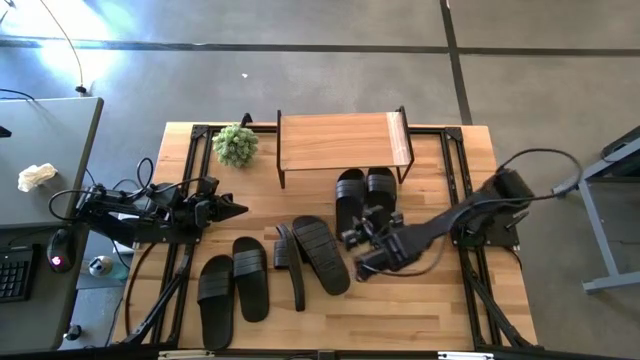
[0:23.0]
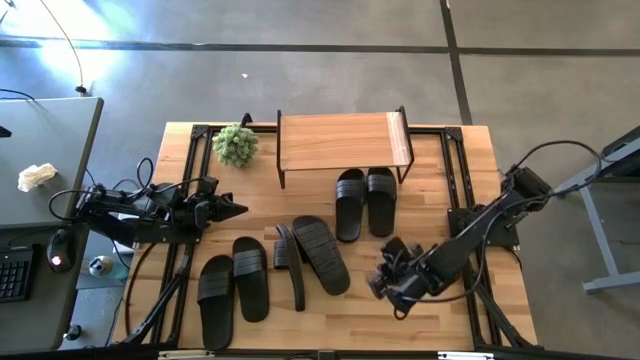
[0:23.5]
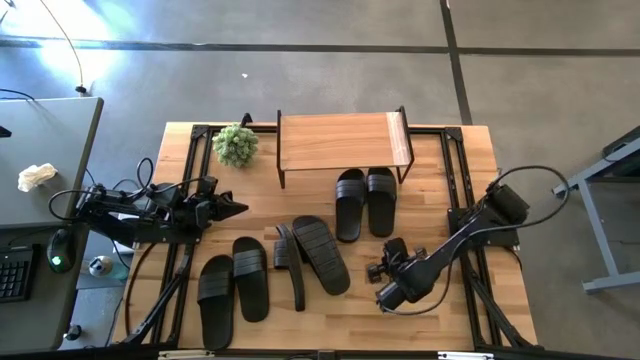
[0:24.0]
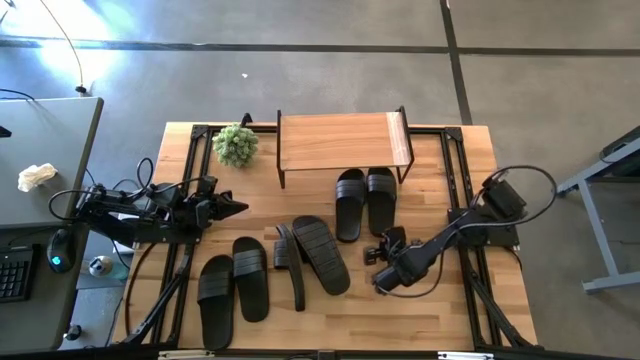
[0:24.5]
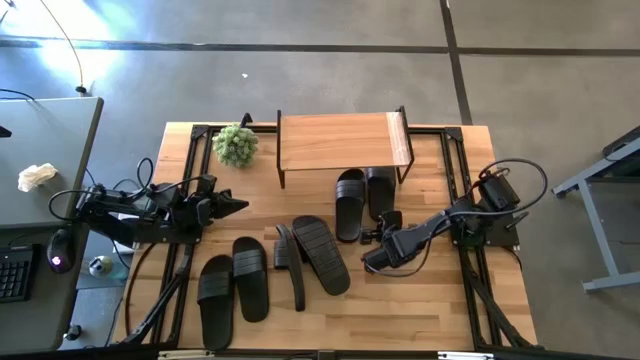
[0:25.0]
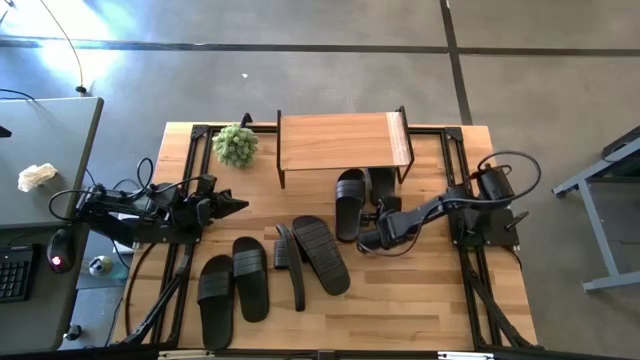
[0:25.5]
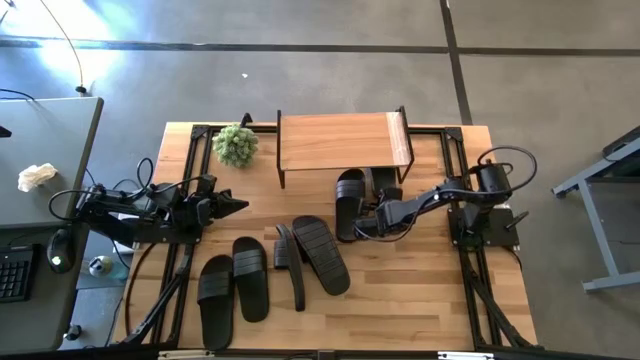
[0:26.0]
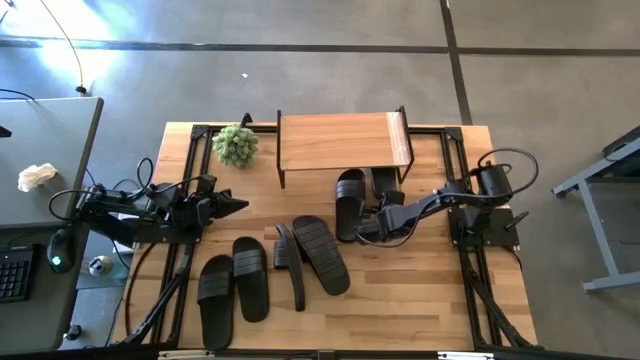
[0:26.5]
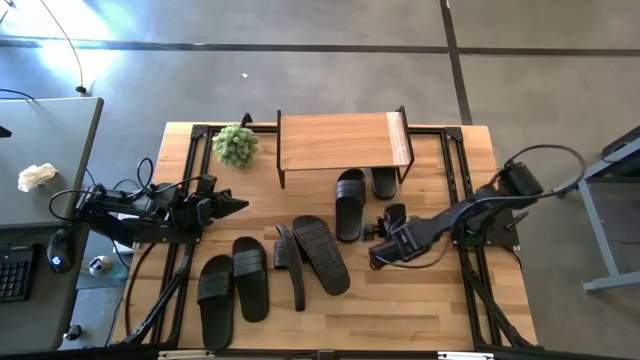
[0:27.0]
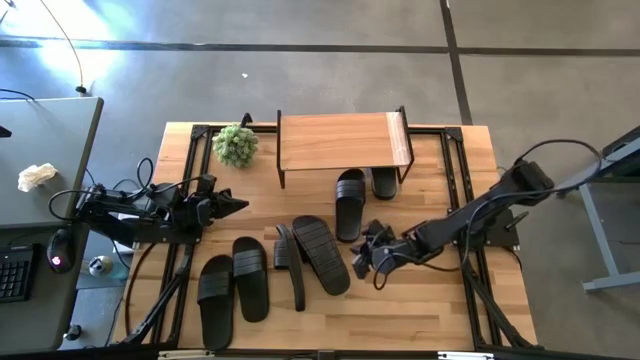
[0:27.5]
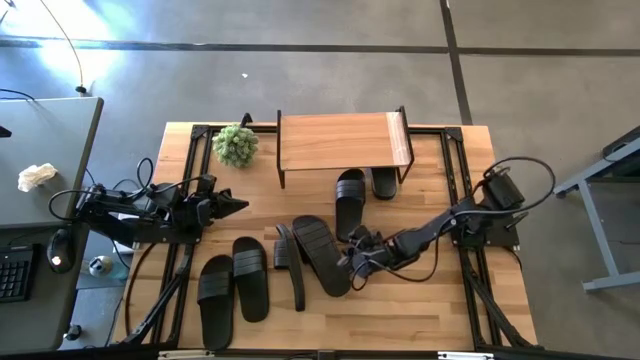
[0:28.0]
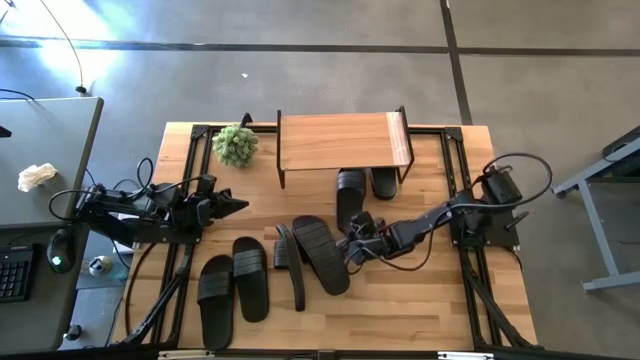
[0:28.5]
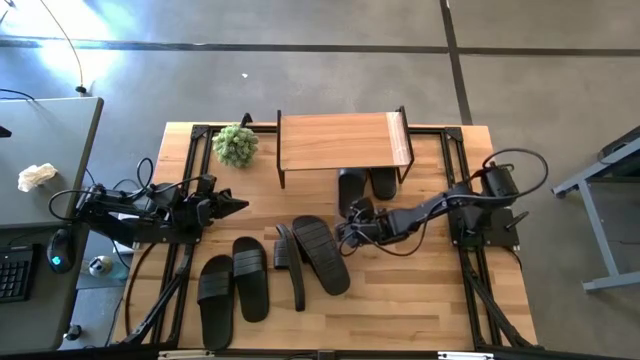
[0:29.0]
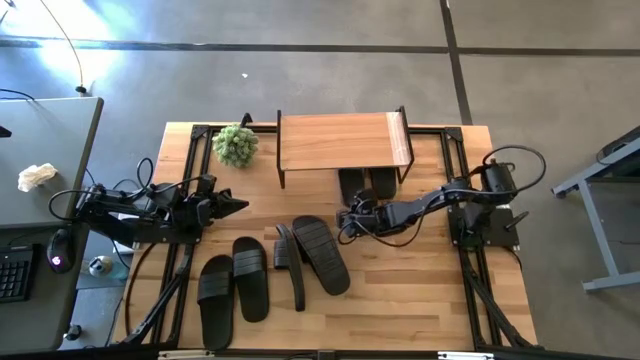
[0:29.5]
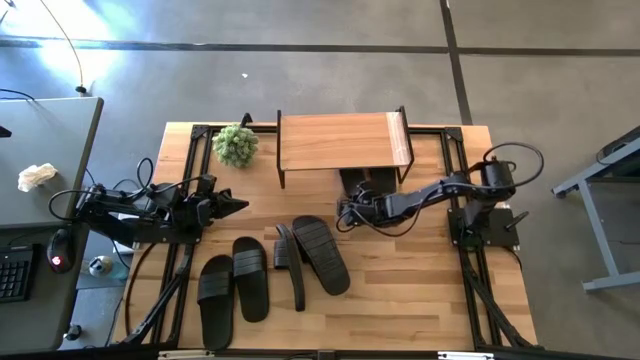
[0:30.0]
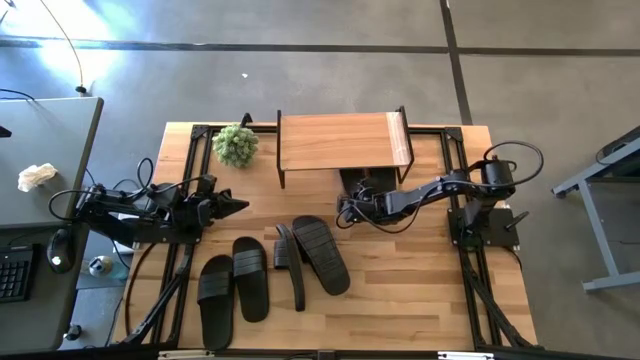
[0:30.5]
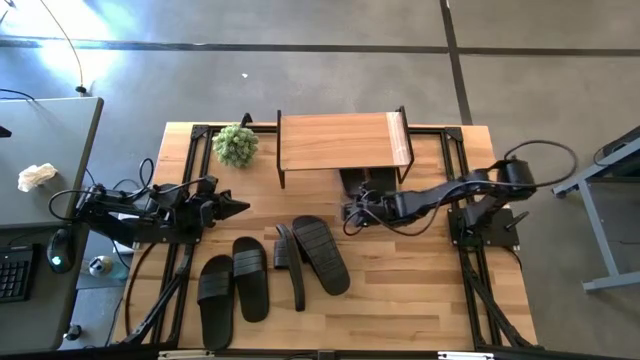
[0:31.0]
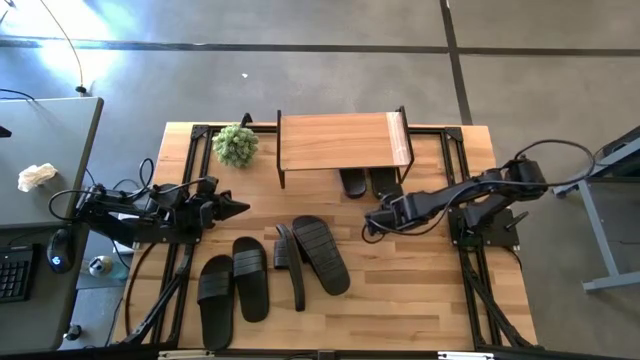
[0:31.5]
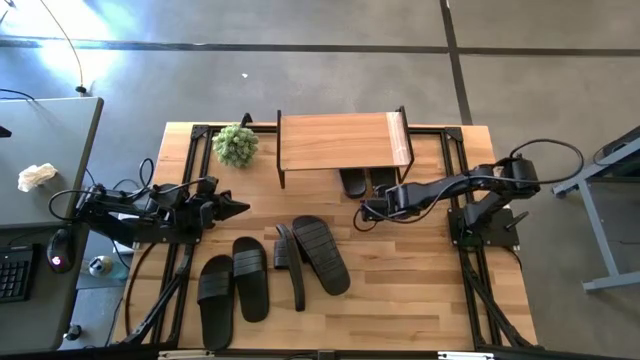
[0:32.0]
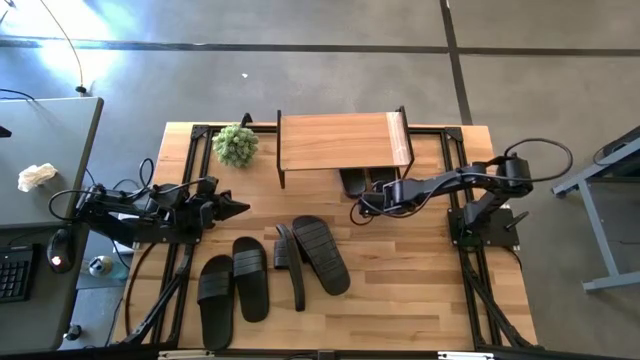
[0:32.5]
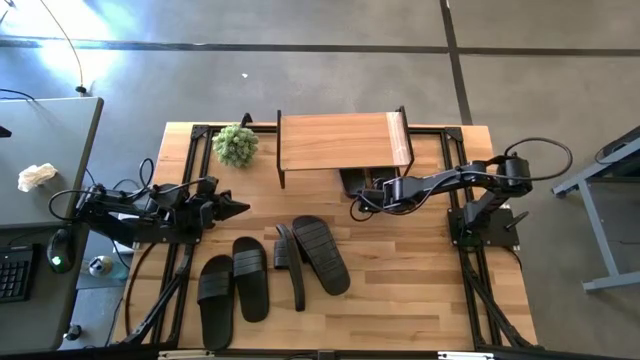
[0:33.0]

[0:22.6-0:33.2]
Task: Pick and place slides into the shelf
Adjust the pair of black slippers under the shelf

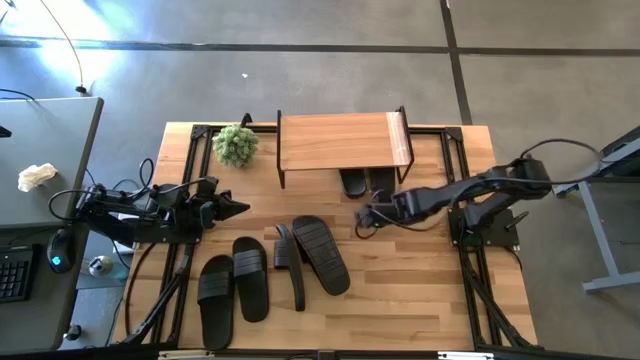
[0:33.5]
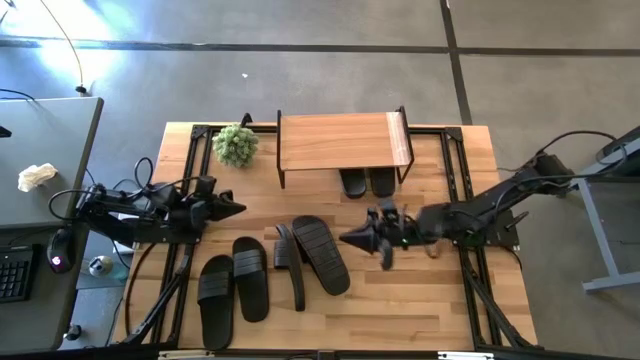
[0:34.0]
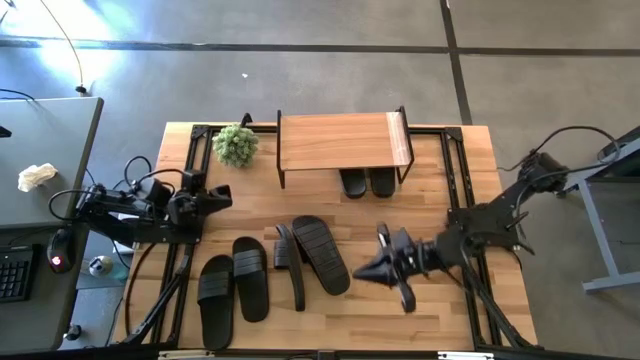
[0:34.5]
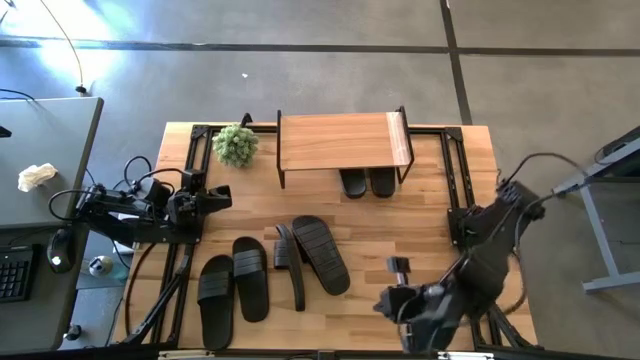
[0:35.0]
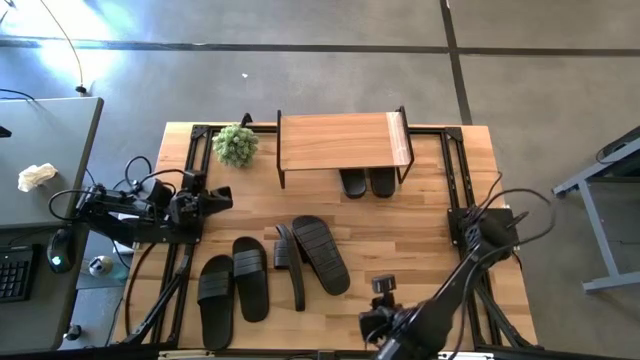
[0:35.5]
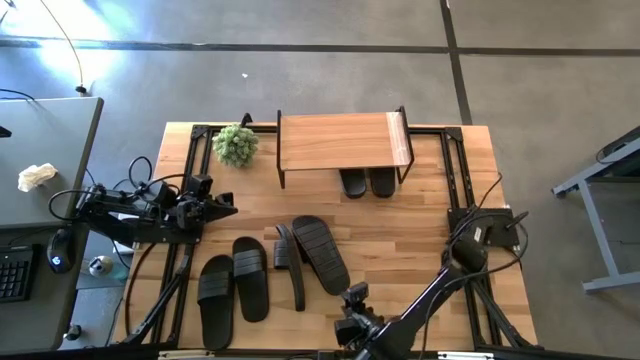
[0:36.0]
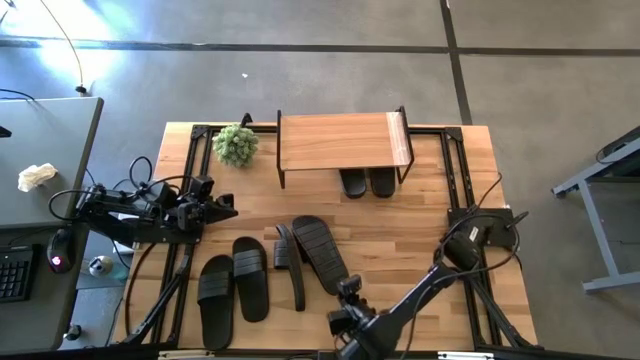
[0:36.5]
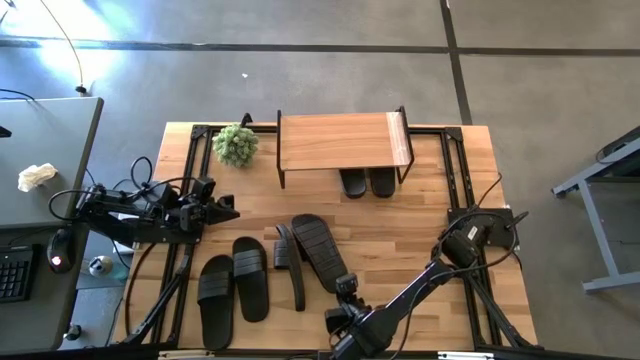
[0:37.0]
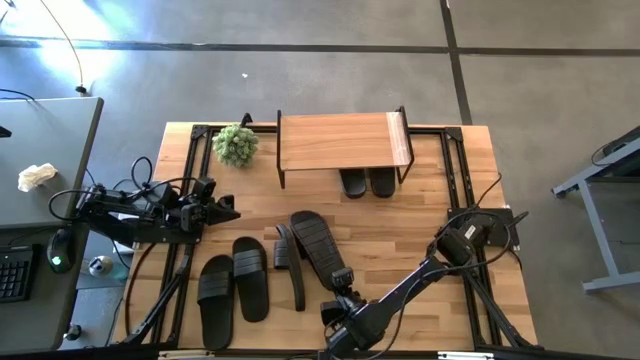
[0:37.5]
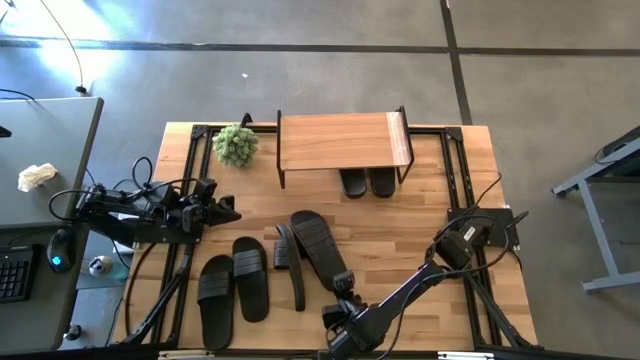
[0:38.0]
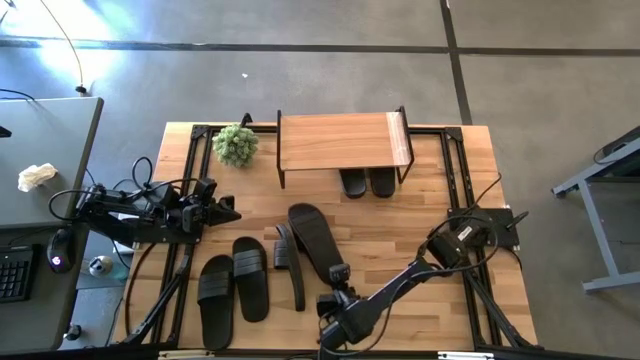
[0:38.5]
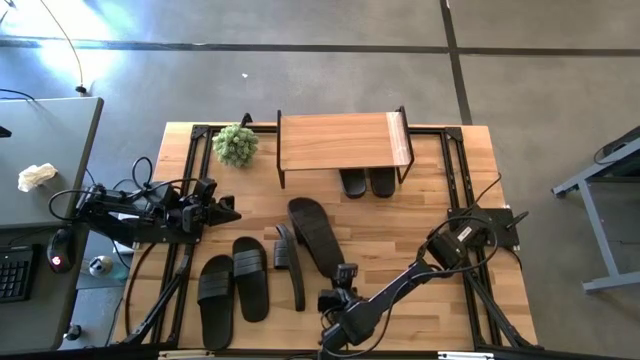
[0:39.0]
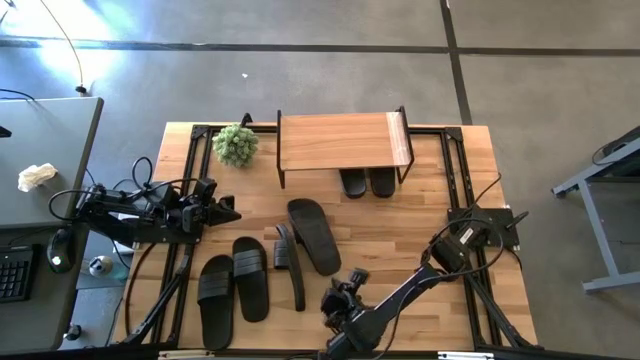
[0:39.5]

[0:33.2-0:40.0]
Adjust the black slipper

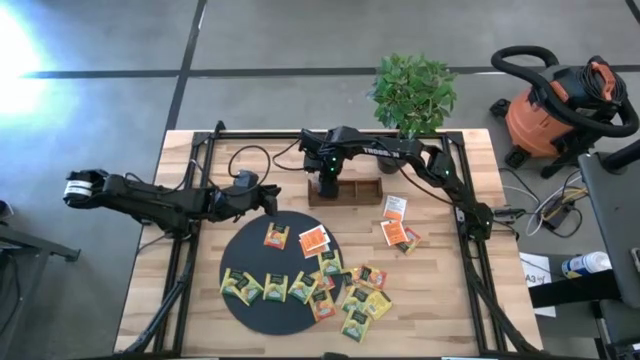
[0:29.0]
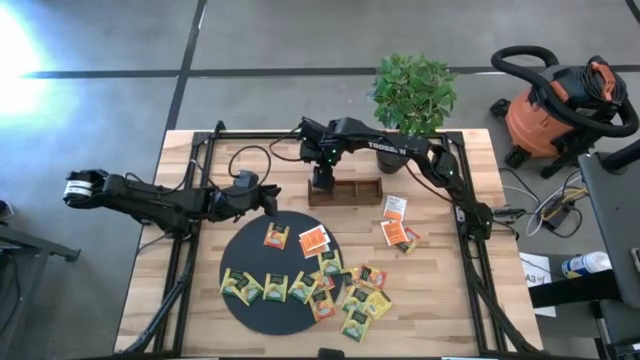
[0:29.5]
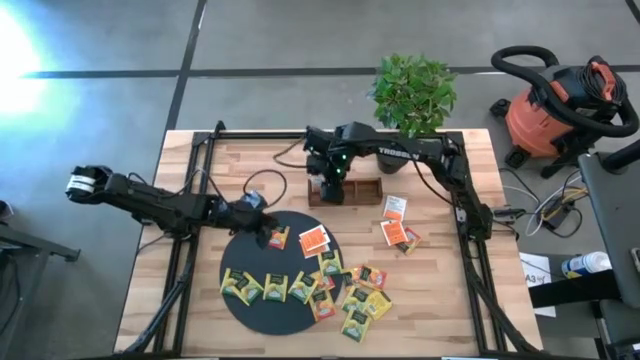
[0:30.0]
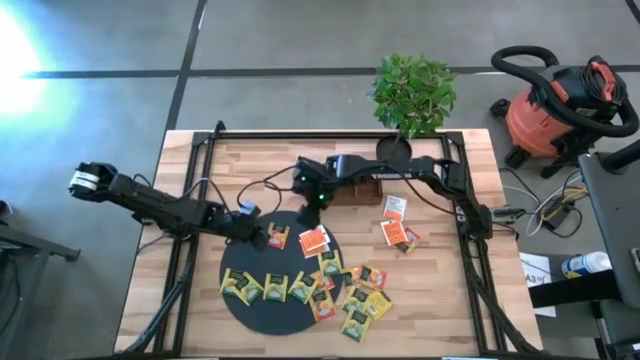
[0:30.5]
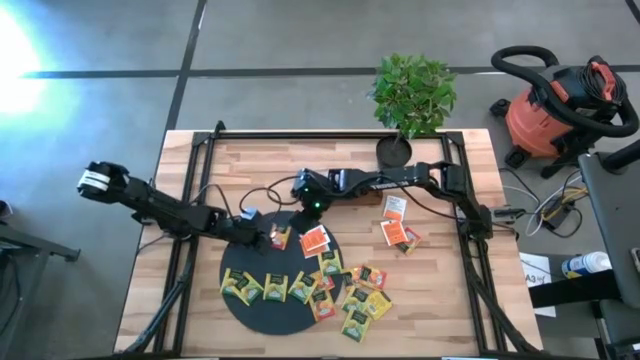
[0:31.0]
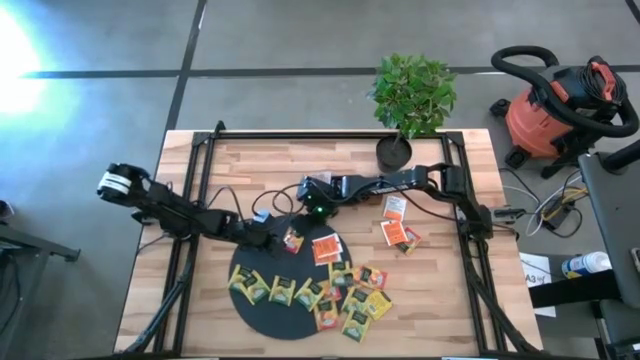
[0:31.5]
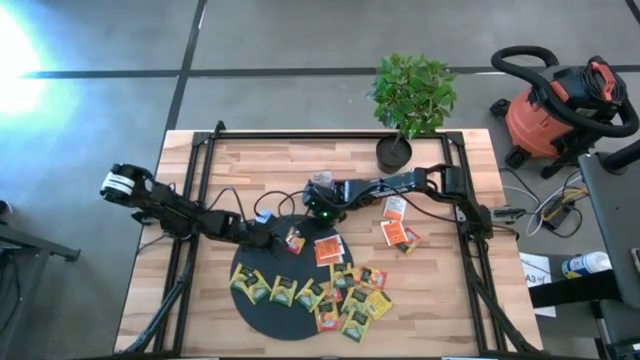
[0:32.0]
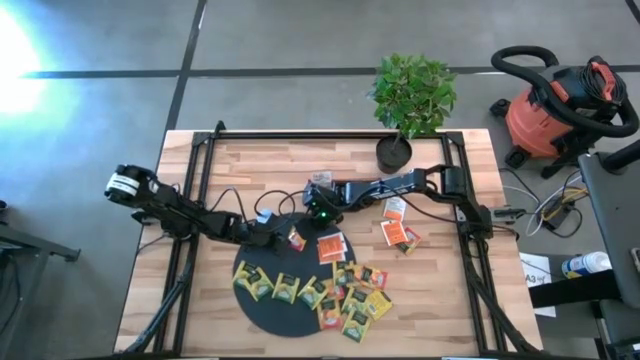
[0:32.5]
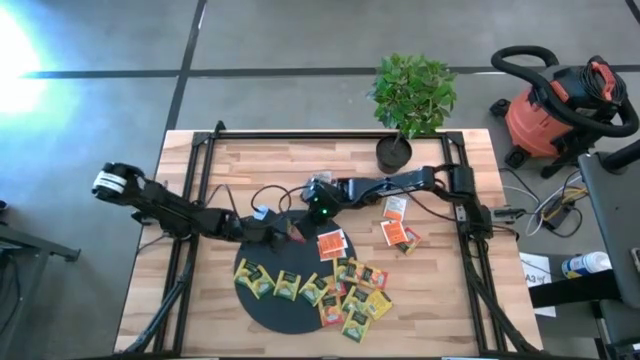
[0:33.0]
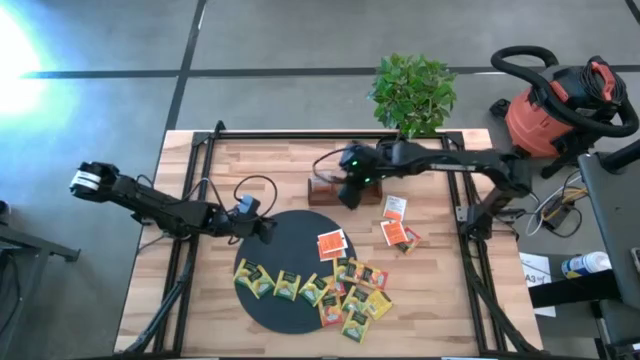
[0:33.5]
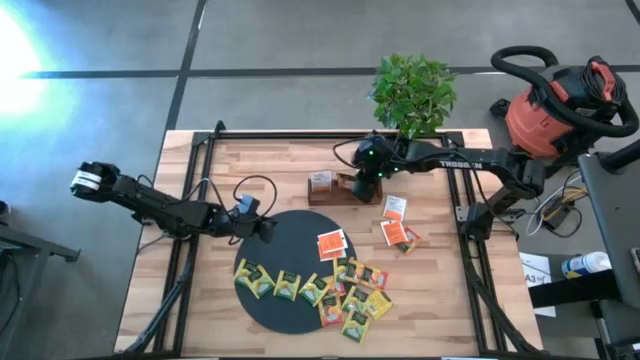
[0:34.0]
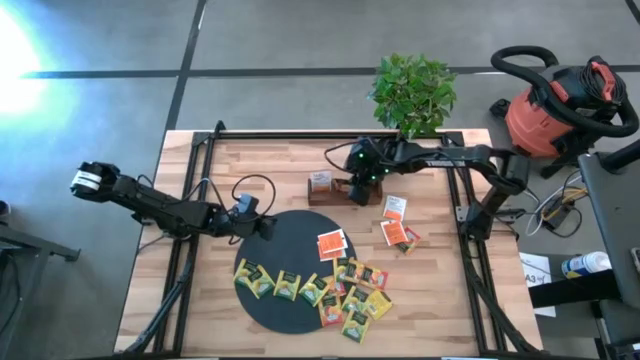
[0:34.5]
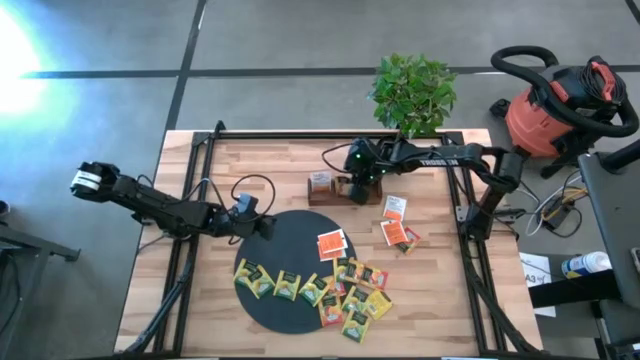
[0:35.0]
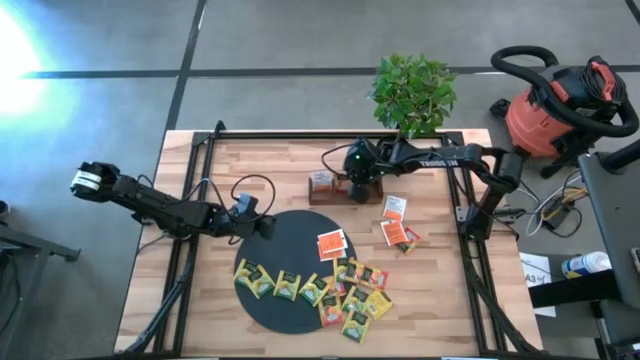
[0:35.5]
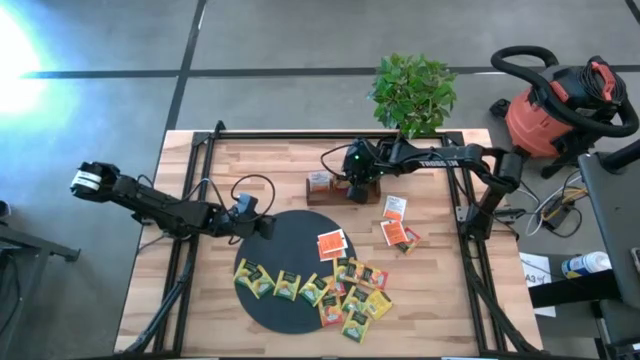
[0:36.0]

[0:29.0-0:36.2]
Task: Pick & Place Tea
Put the orange tea bag into the middle section of the brown wooden organizer
